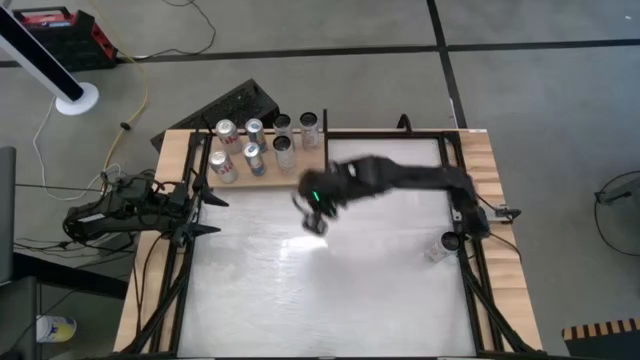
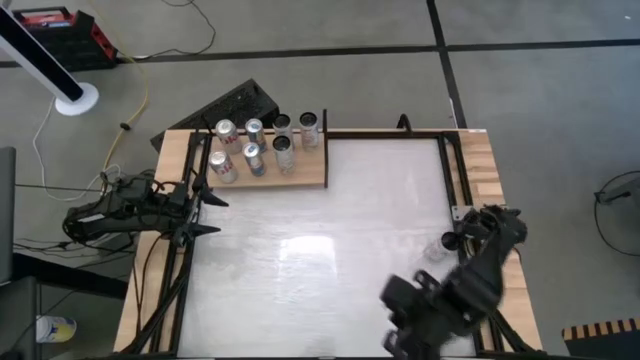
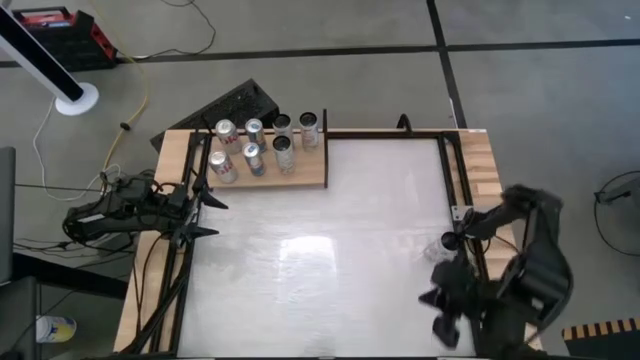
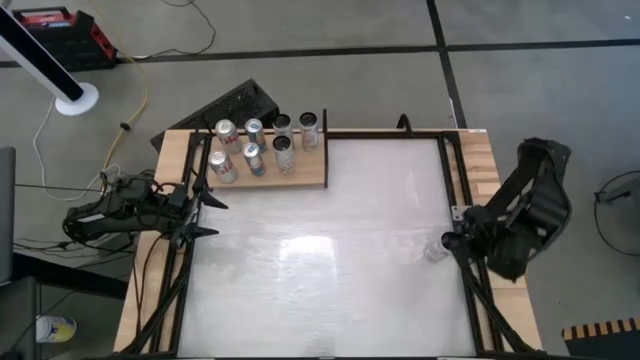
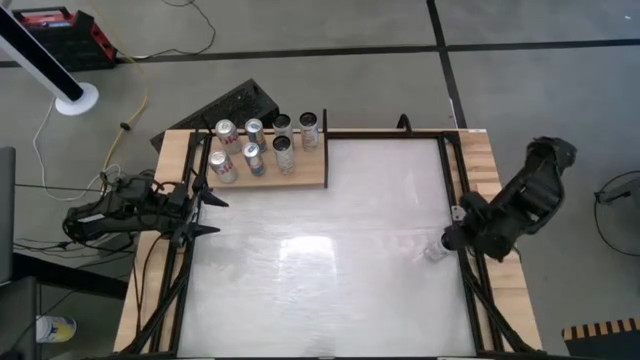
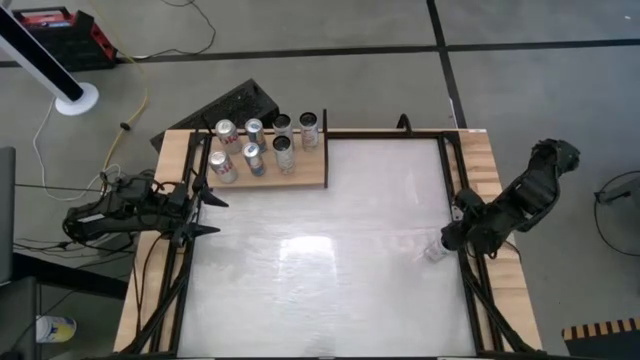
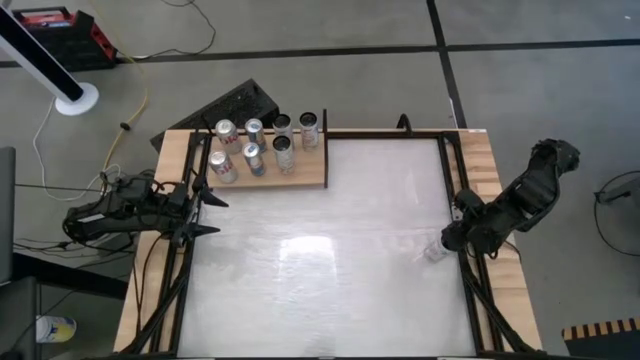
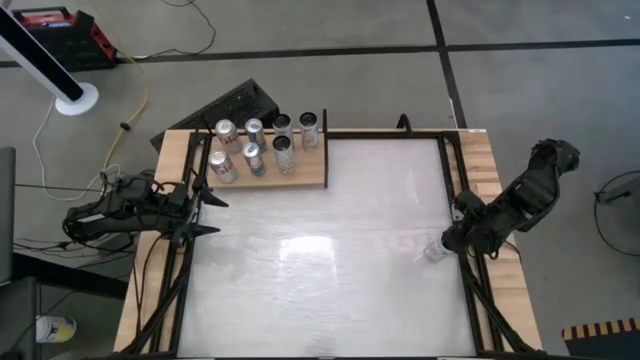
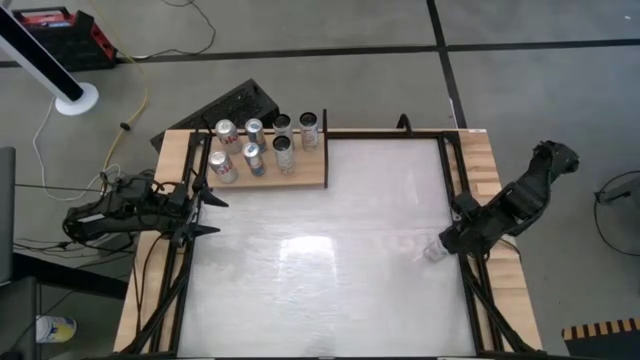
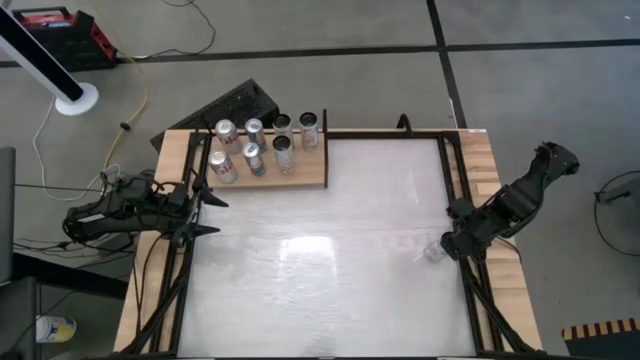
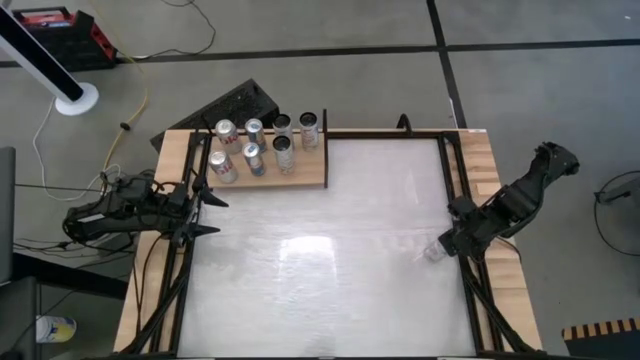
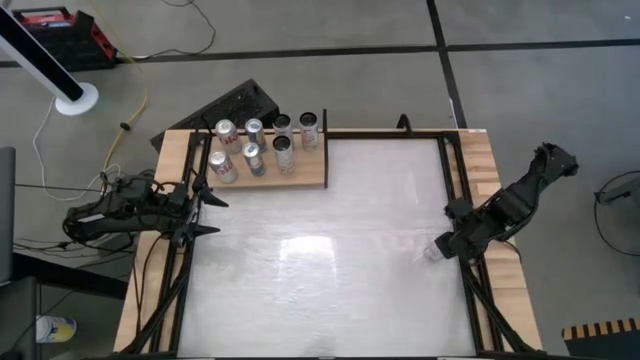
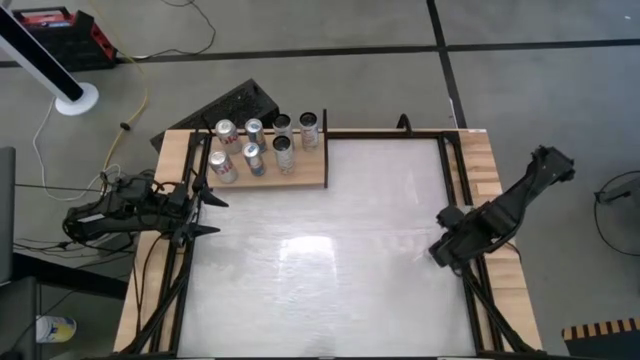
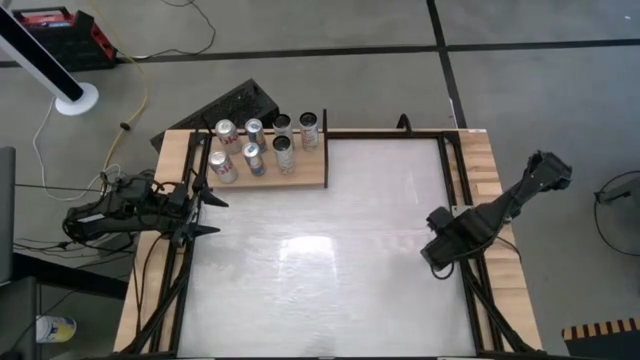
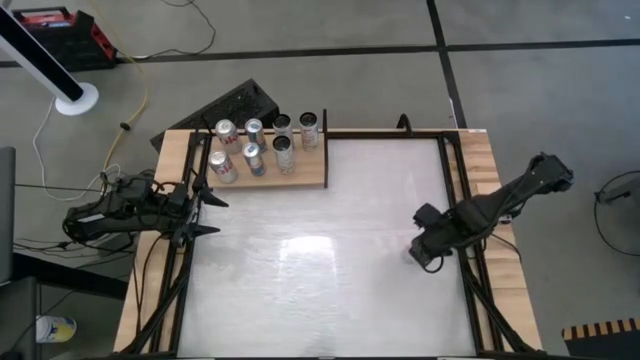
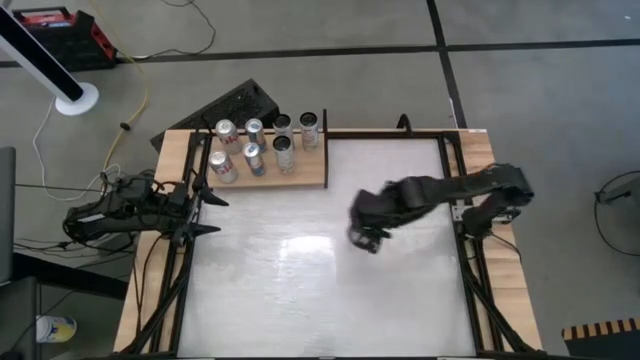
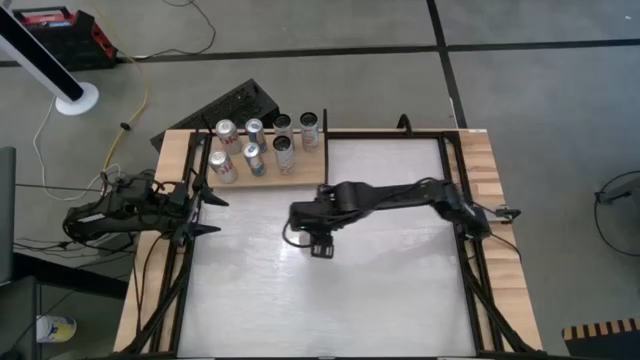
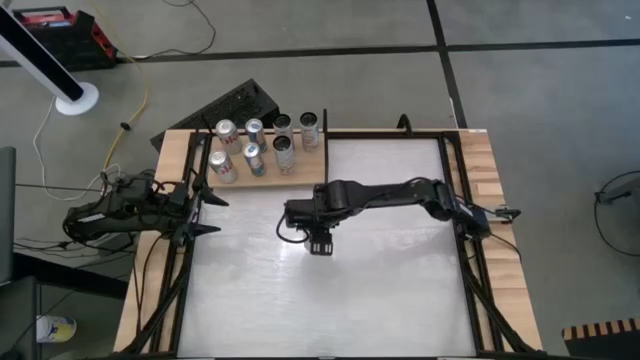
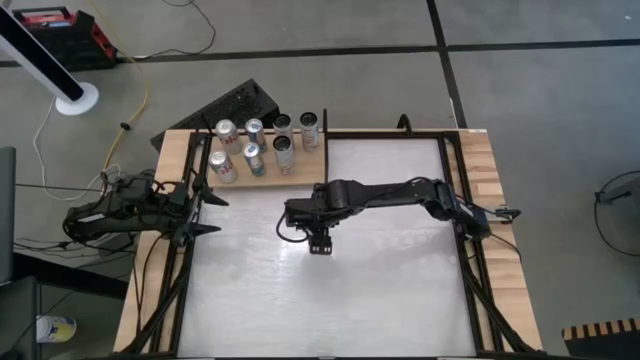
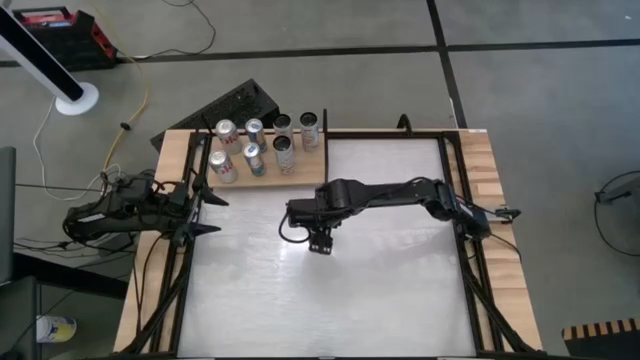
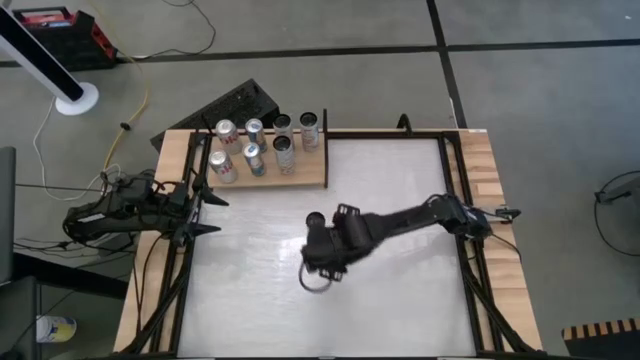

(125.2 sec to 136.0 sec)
Task: Place canned beverage on shelf
Move the white and pink soda can to the center of the table

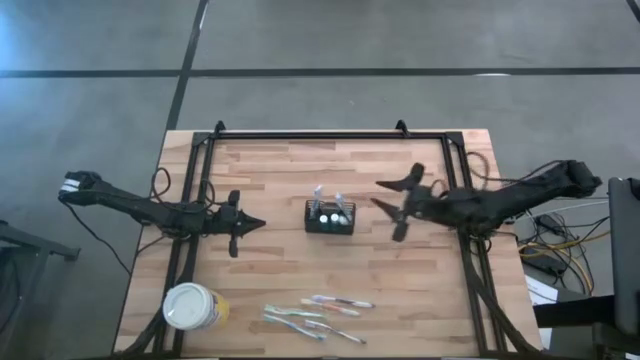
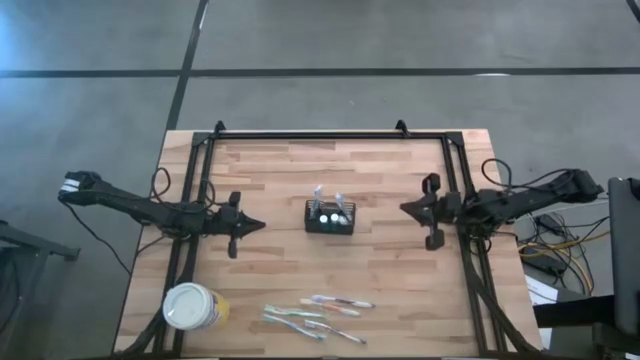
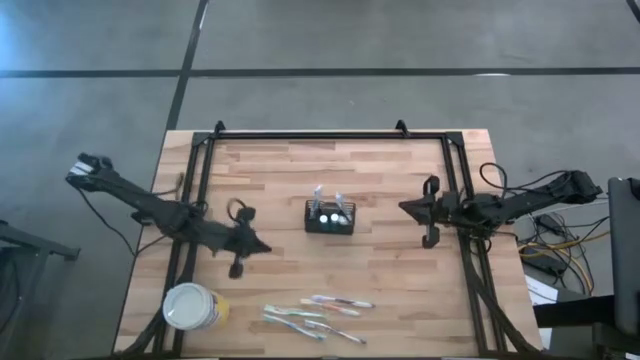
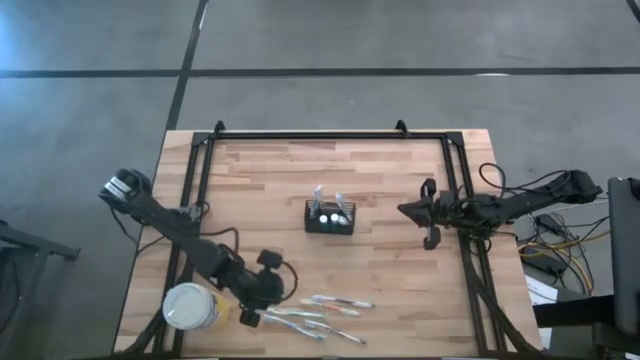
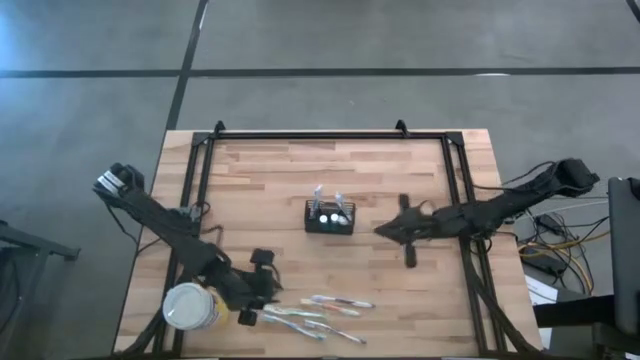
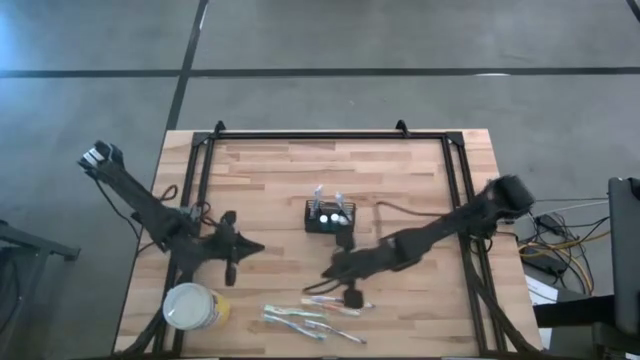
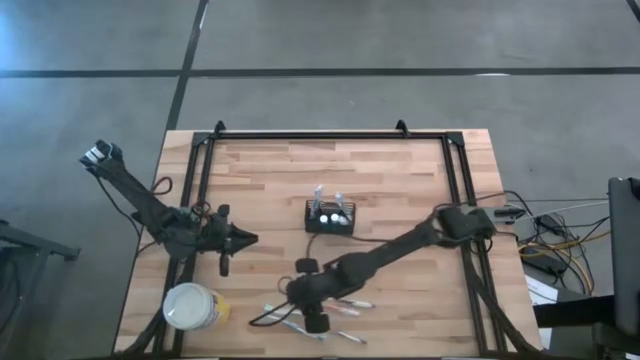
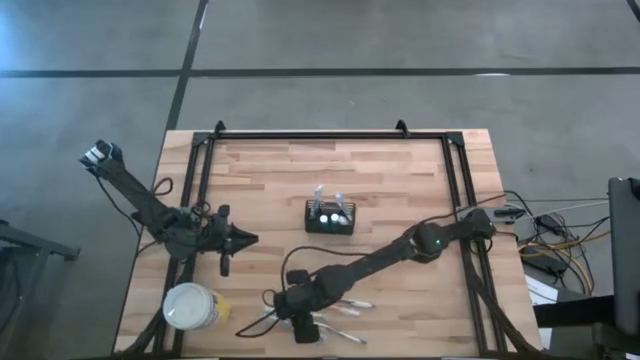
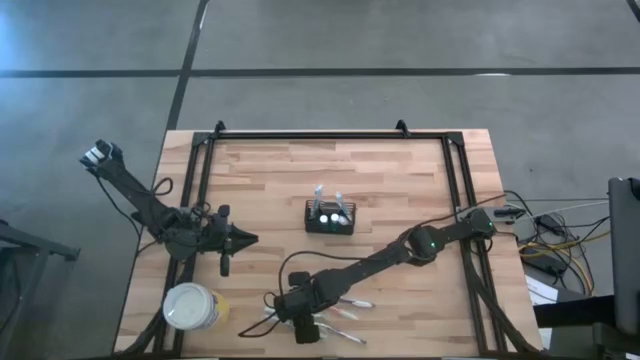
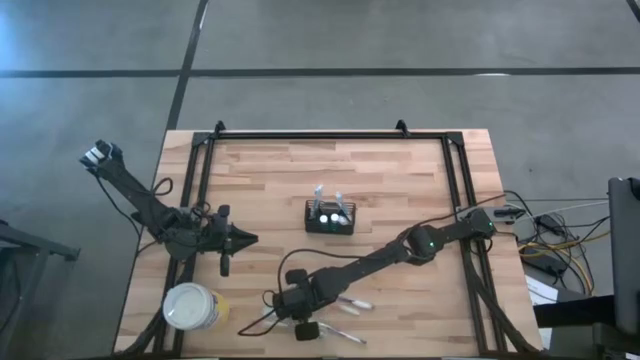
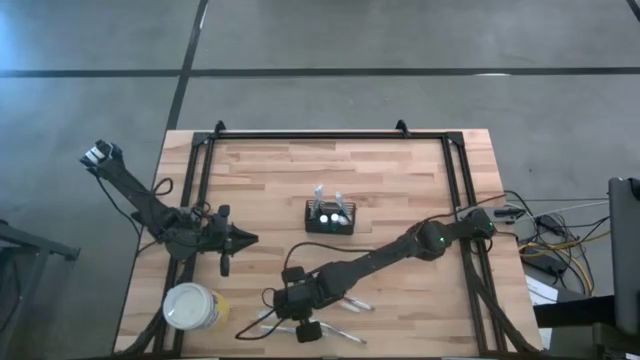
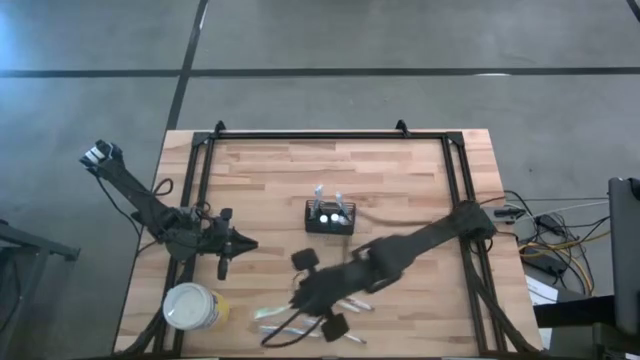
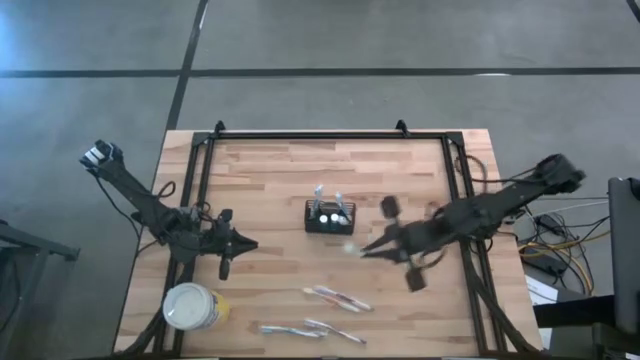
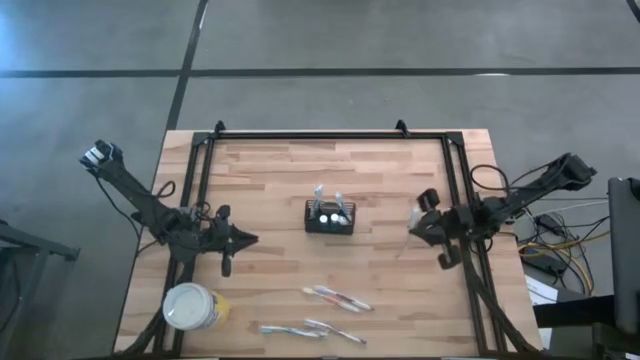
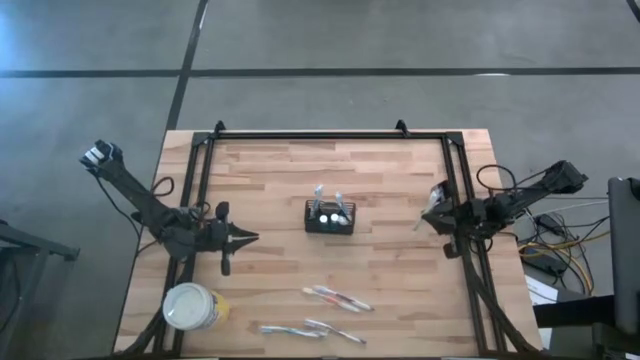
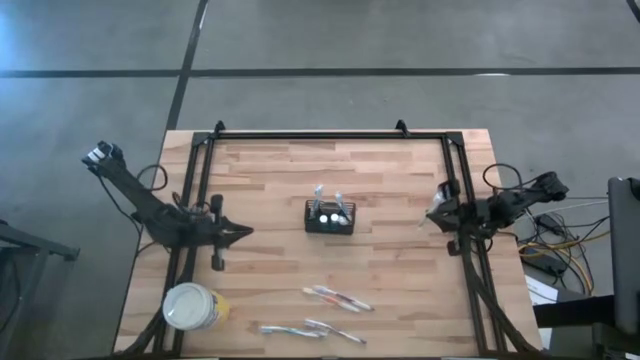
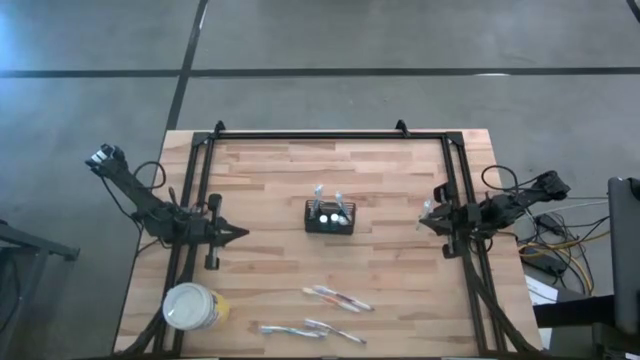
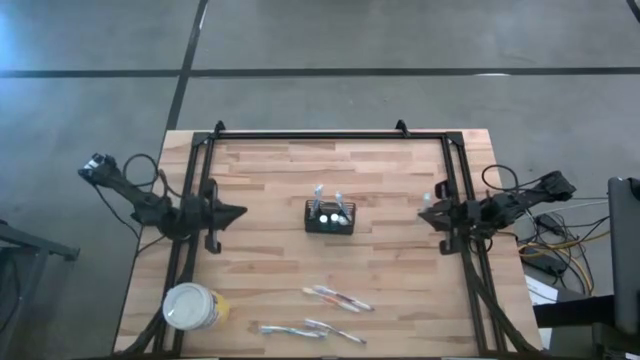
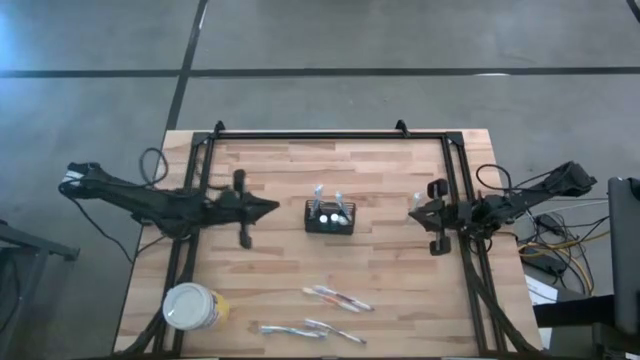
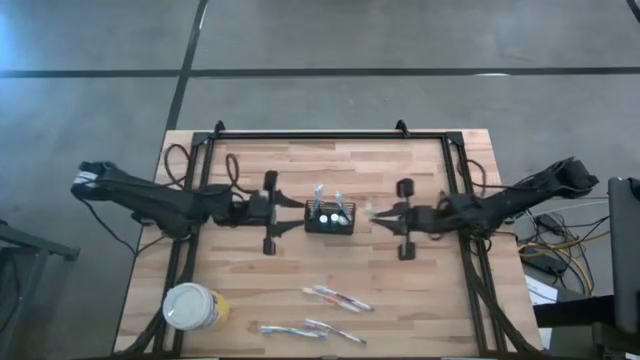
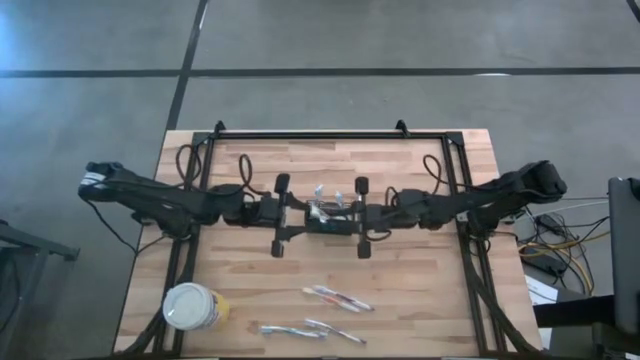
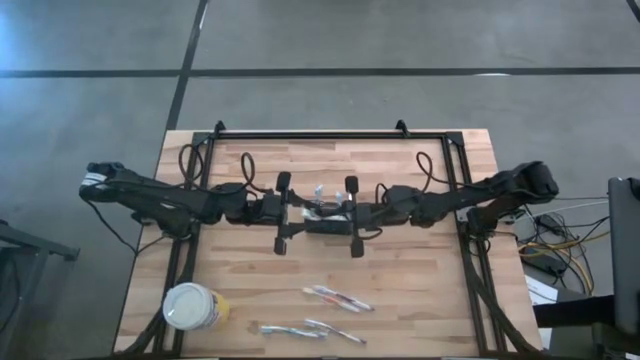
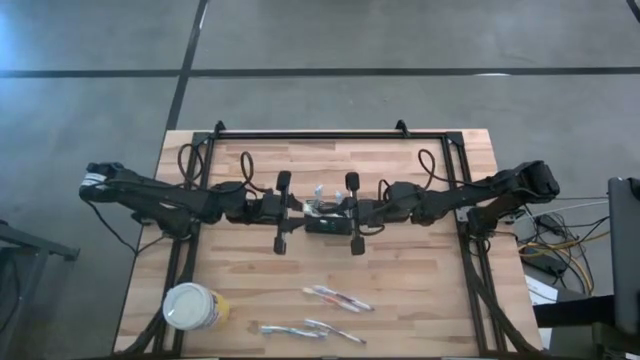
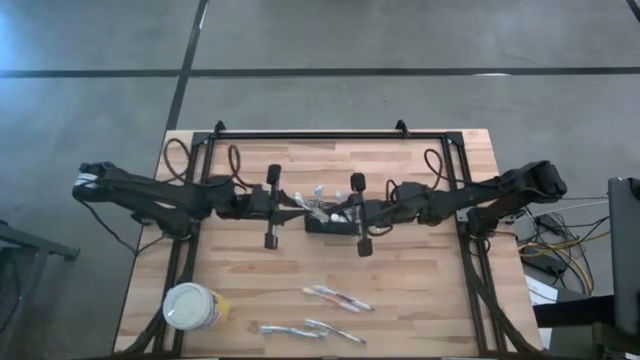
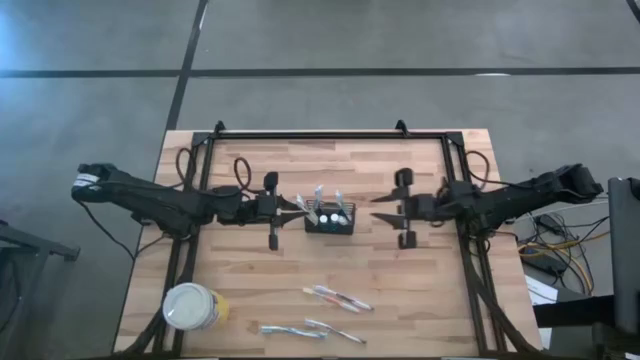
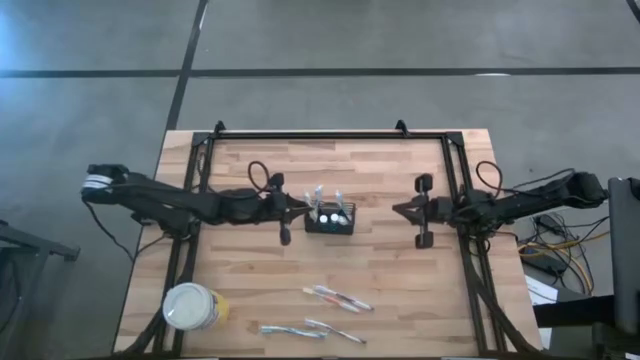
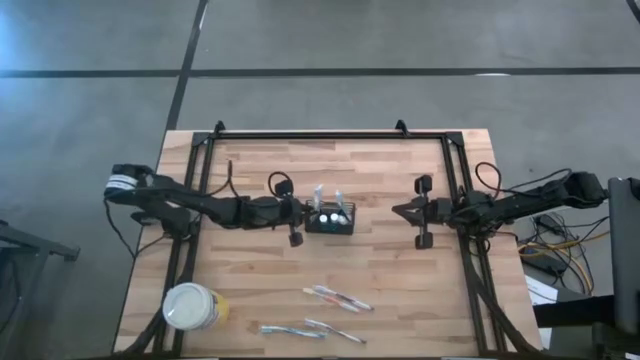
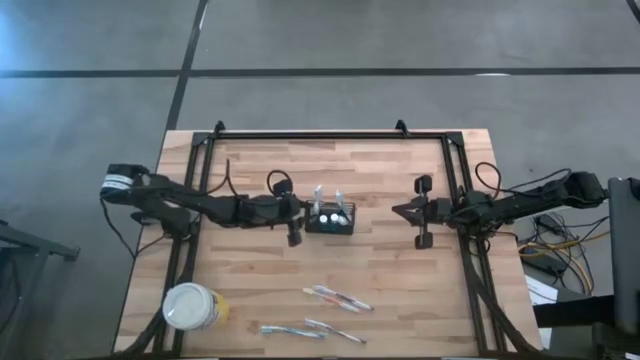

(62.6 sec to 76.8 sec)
Task: Pick & Place toothbrushing station
Put the green toothbrush into the wire organizer
